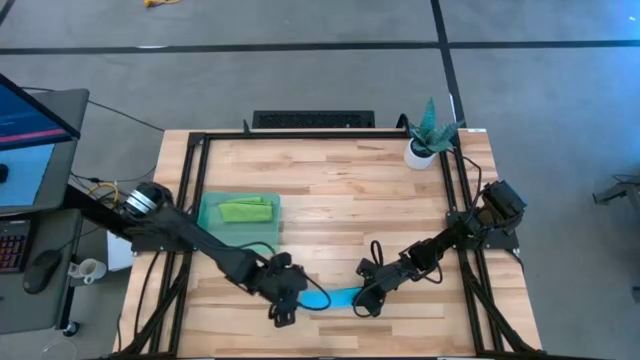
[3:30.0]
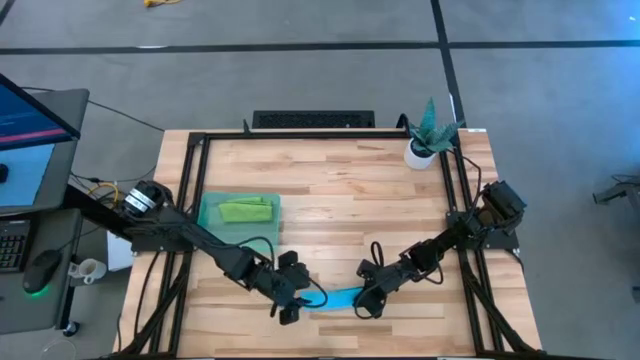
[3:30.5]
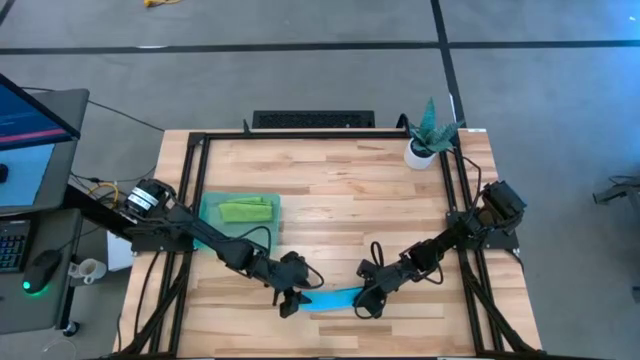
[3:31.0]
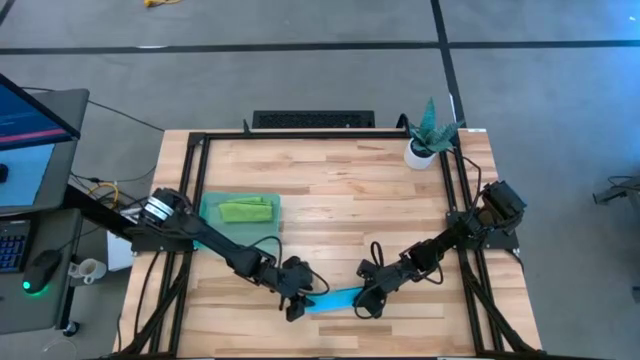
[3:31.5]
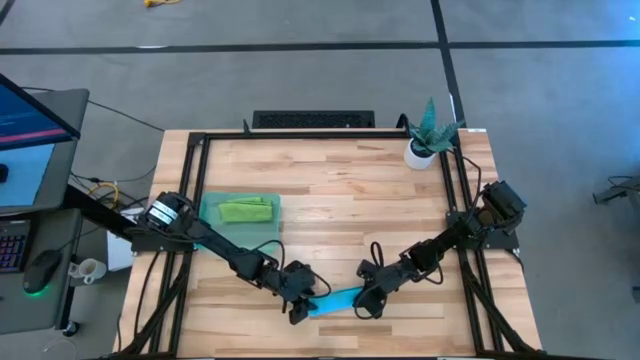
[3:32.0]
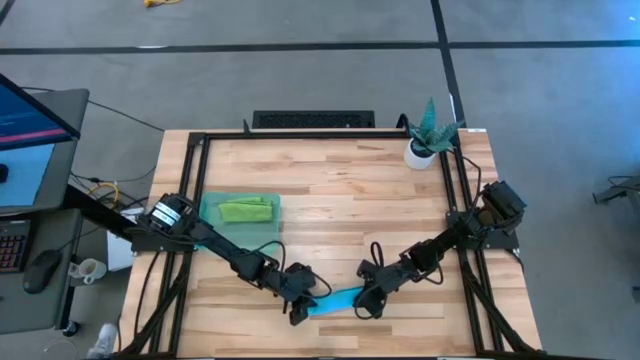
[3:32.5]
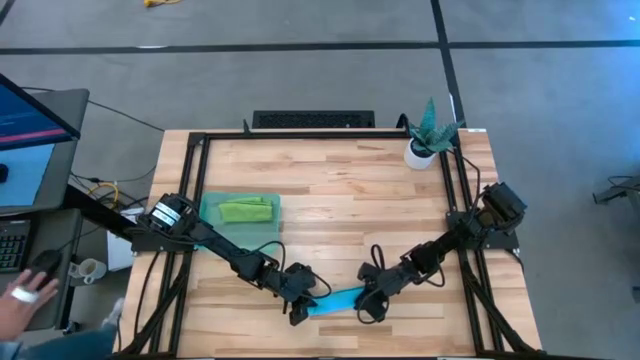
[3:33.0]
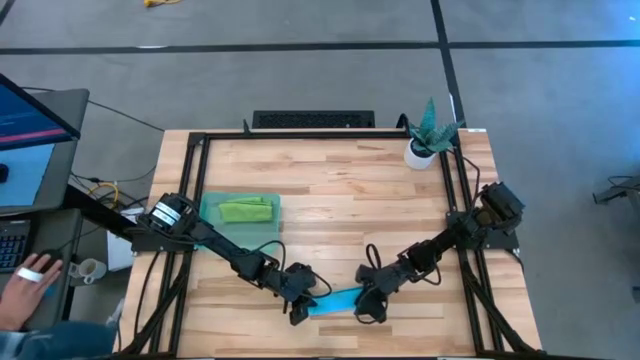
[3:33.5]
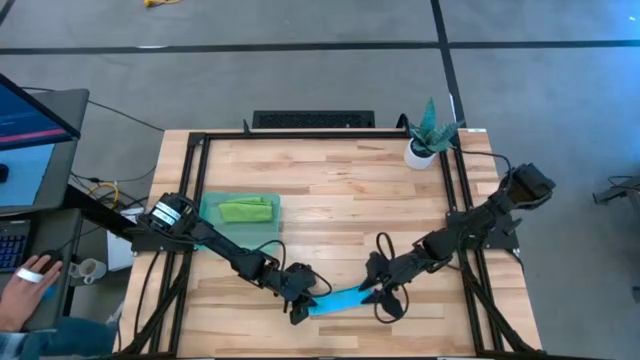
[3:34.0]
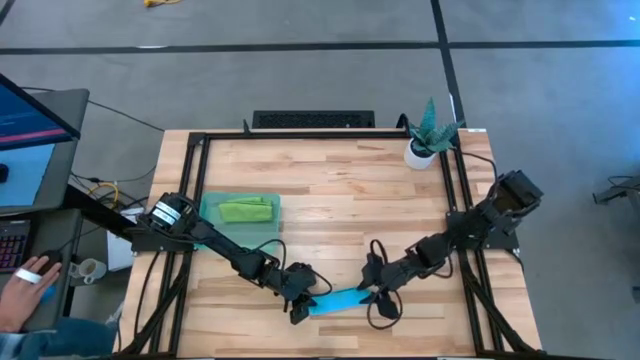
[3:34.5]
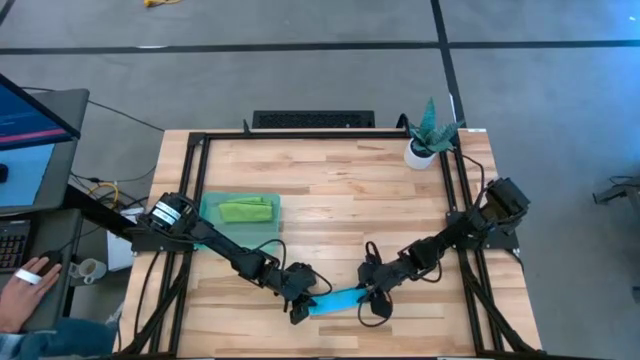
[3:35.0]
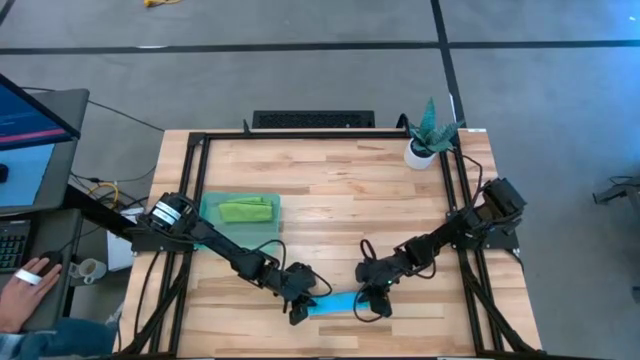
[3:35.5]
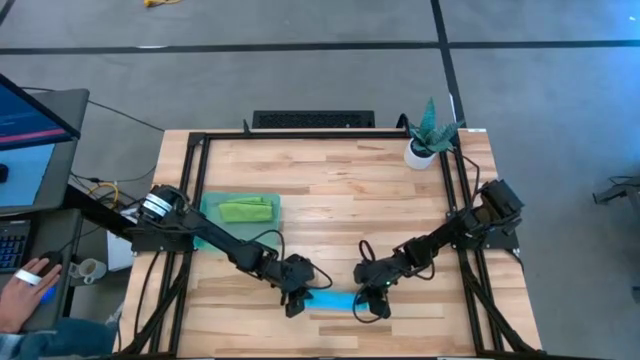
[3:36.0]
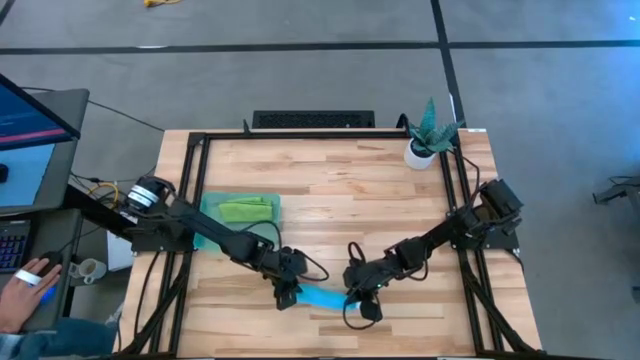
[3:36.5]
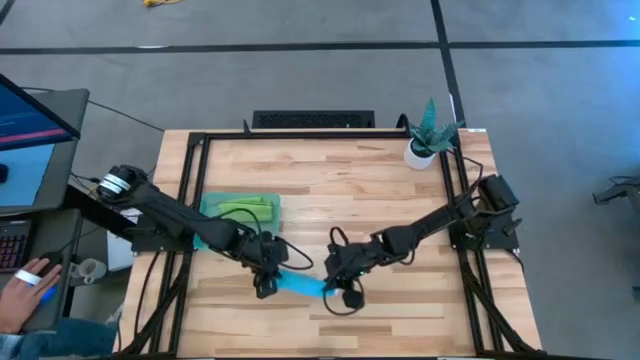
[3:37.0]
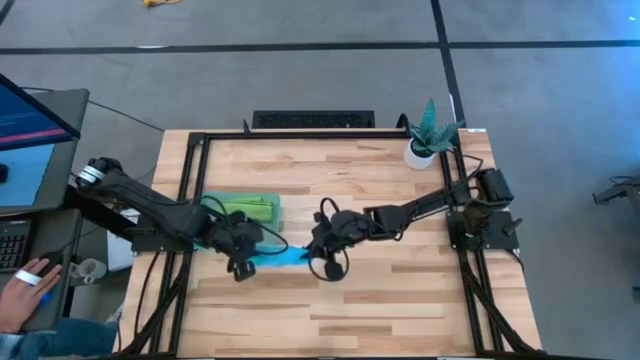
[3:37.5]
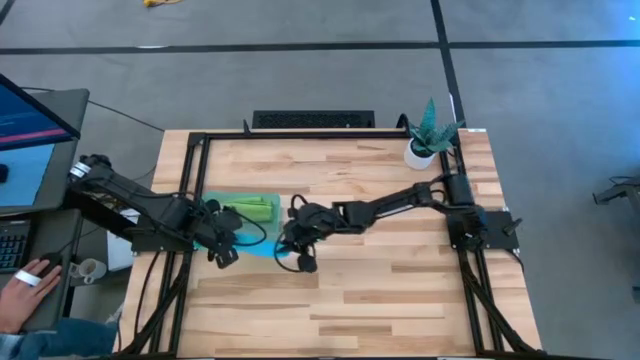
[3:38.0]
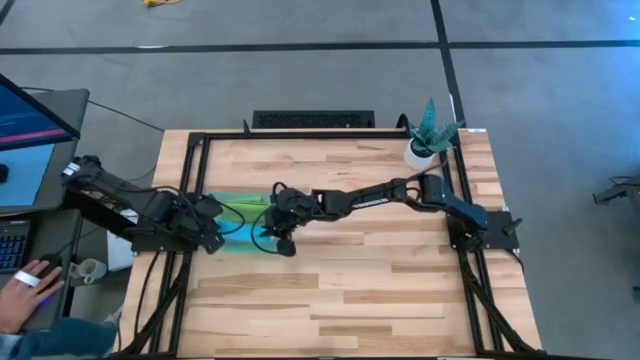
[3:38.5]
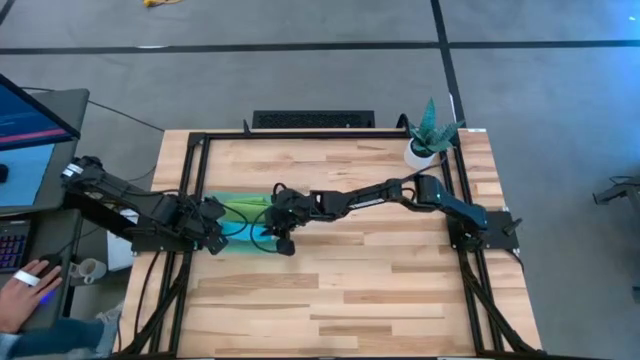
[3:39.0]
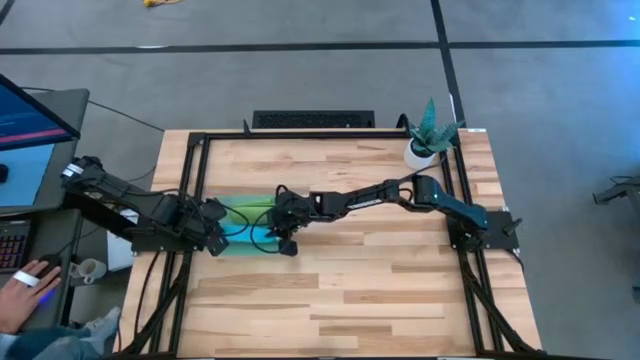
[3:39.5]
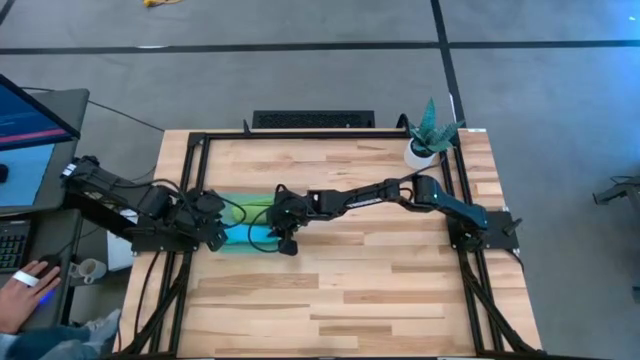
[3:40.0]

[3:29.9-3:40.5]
Task: Roll microfiber towels into tight, uniform cylinder then place into a basket
Put the blue towel into the green bin

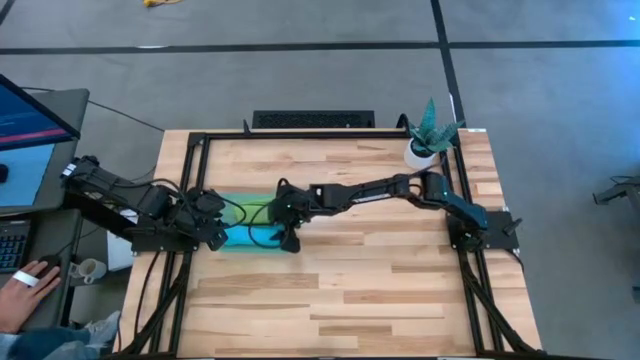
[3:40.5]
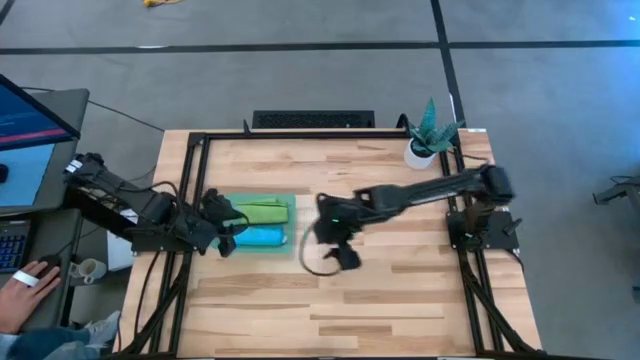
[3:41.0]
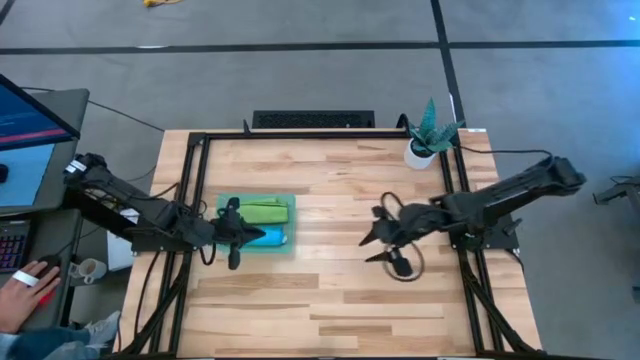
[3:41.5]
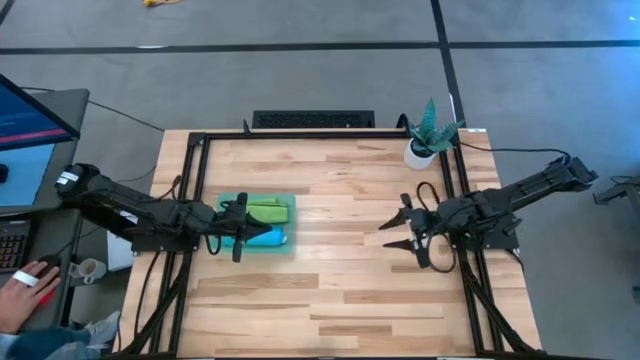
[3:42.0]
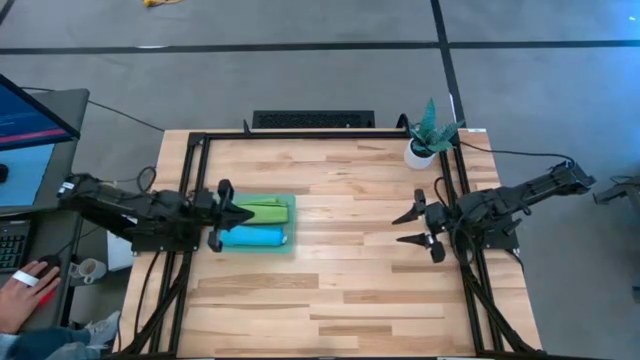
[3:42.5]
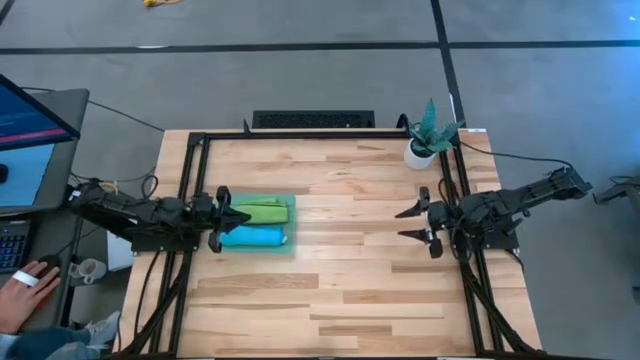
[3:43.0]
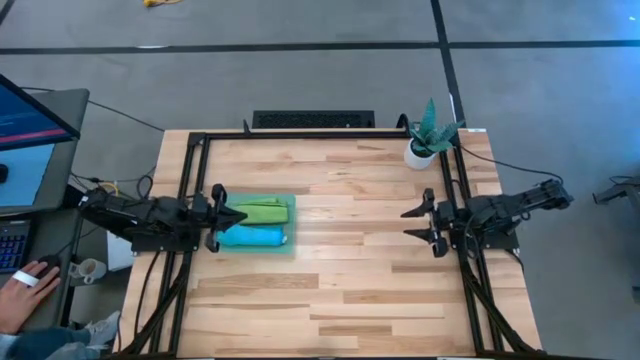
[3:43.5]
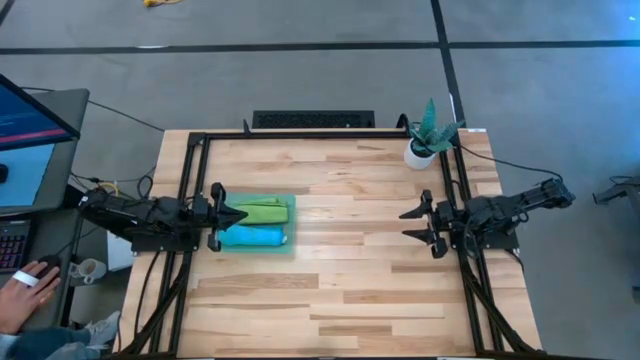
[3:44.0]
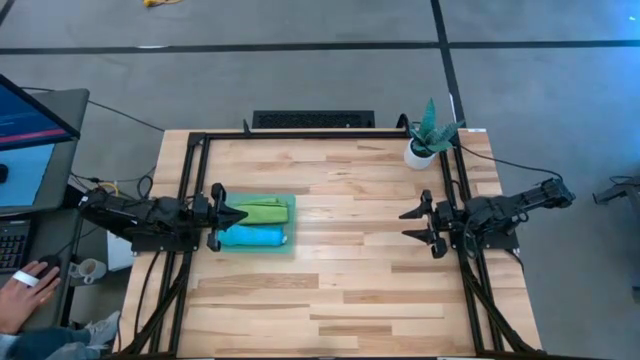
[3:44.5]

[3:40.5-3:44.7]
Return to Home Position

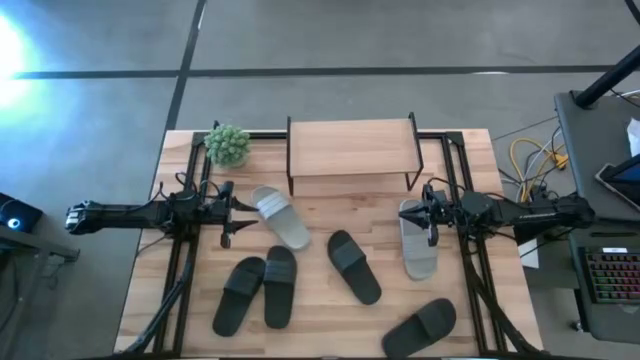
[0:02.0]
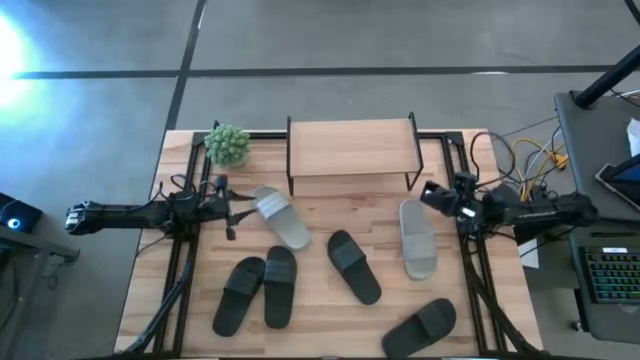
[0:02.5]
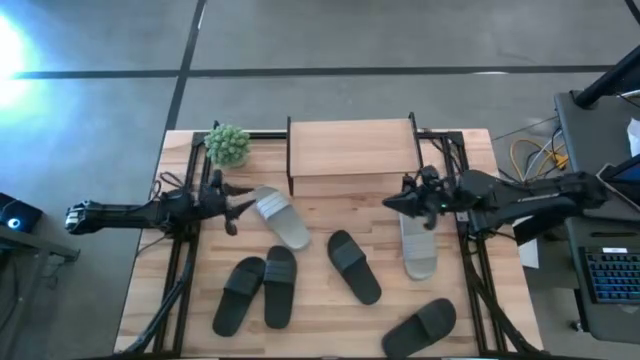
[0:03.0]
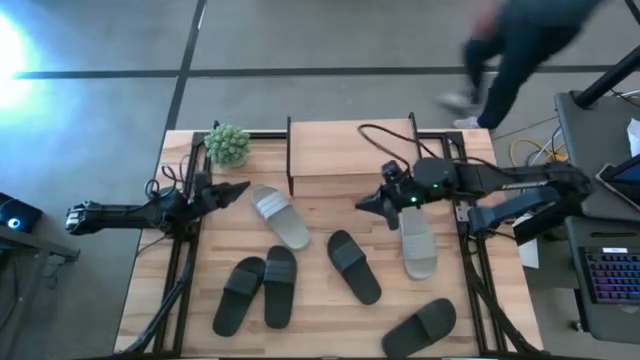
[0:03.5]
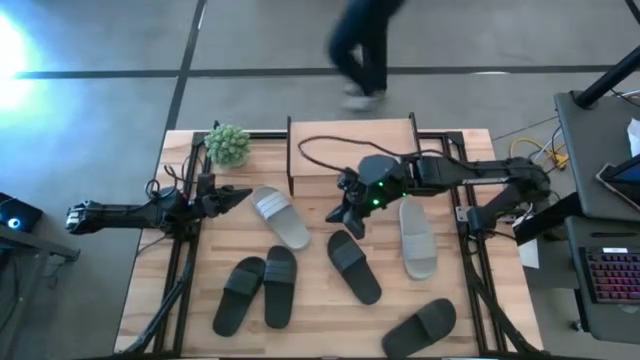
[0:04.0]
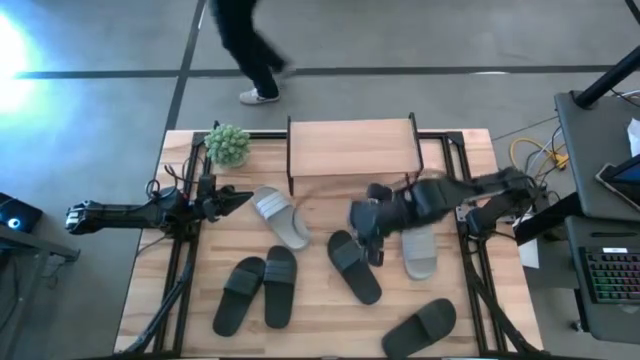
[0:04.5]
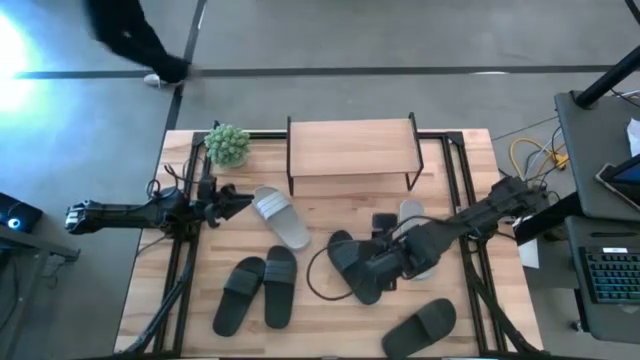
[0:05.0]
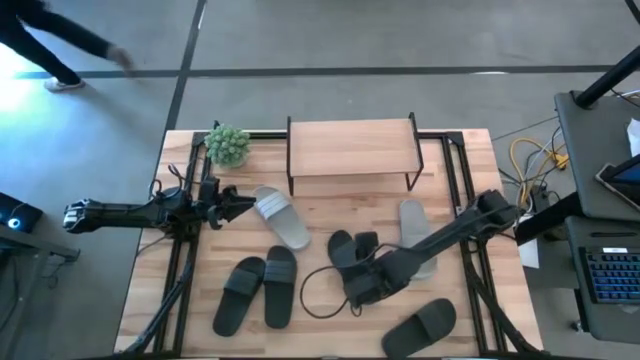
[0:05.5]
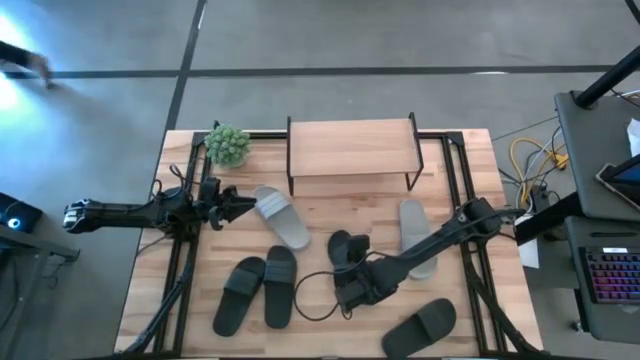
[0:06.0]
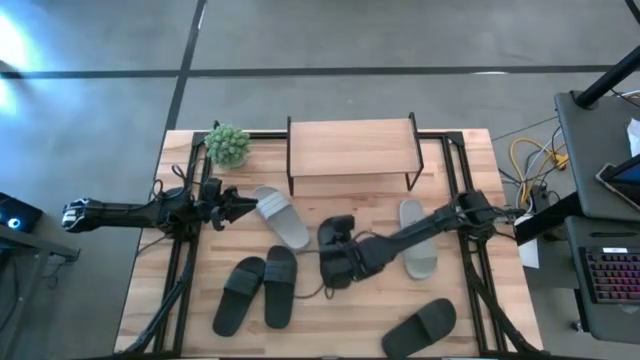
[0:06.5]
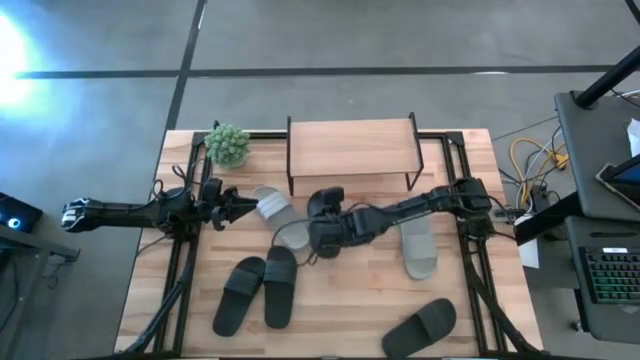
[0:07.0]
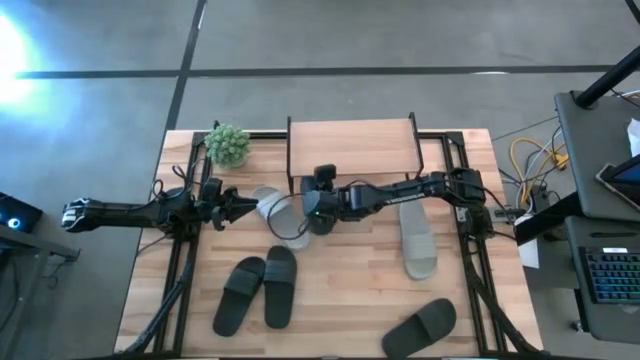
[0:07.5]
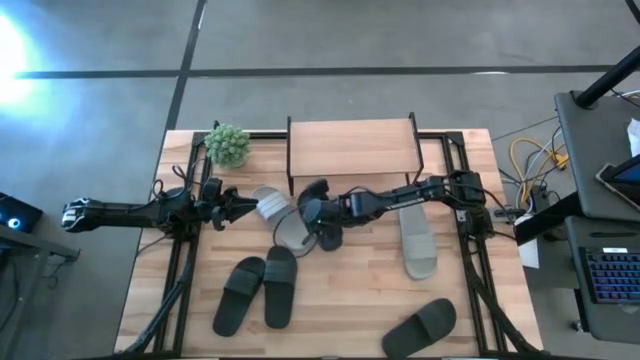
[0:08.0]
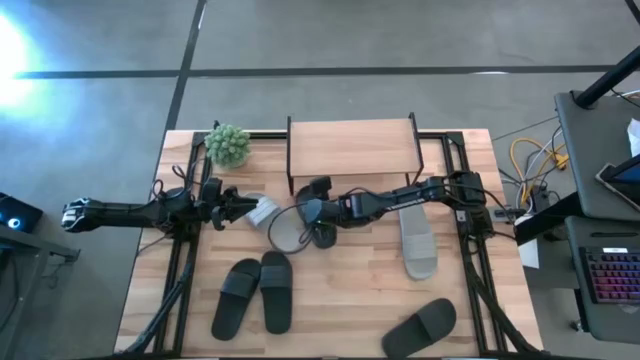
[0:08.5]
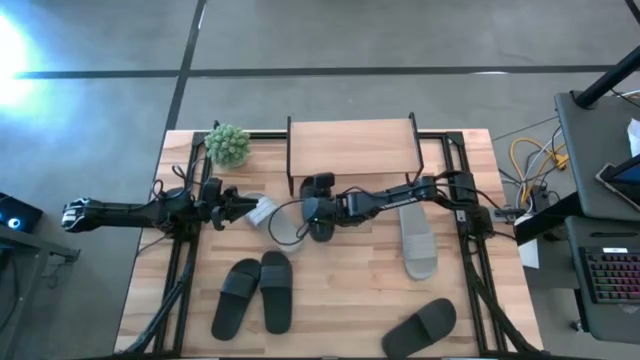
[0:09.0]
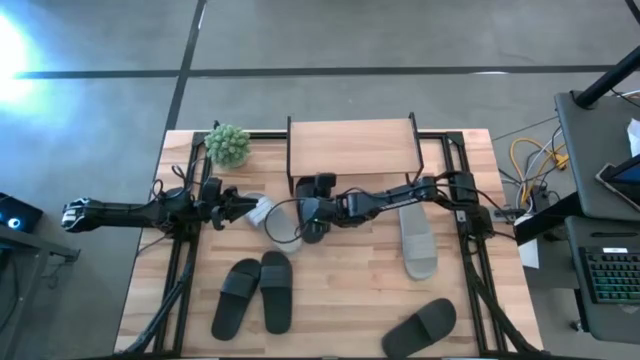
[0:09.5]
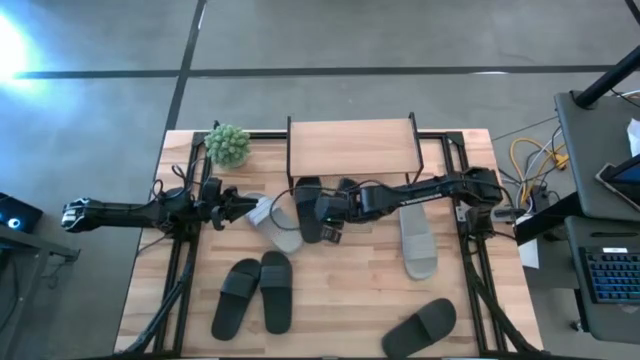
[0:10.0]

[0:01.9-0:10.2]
Task: Pick and place slides into the shelf
Put the black slide under the shelf
